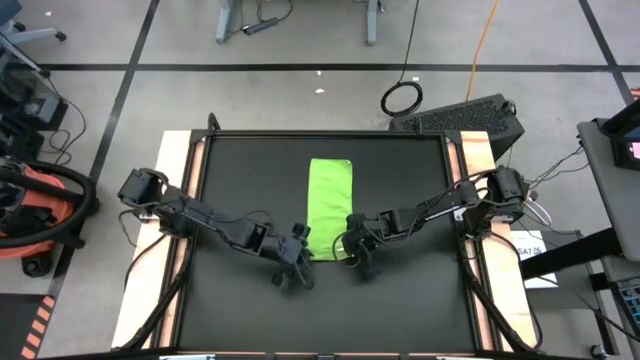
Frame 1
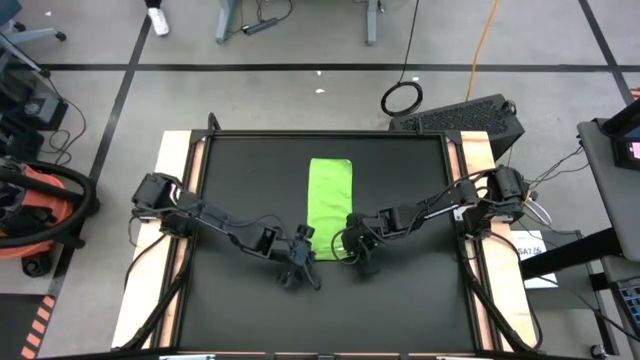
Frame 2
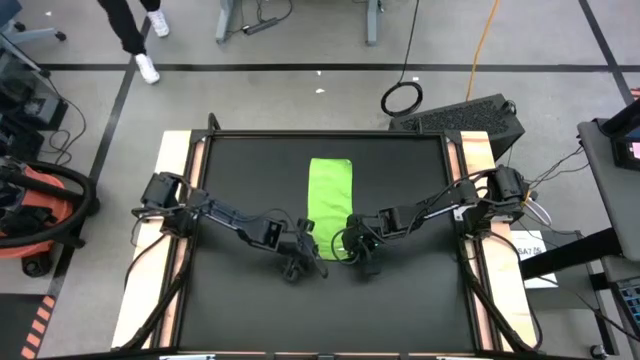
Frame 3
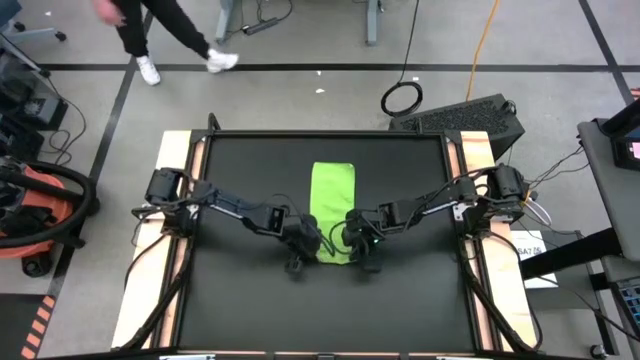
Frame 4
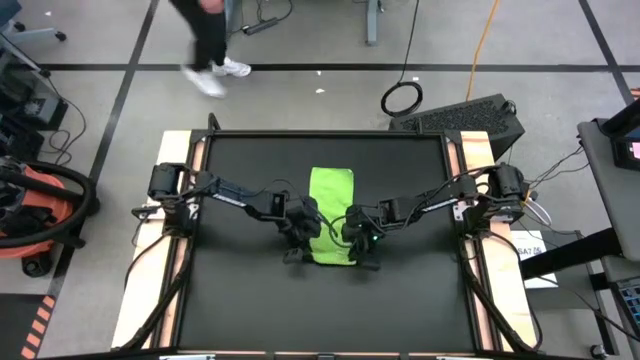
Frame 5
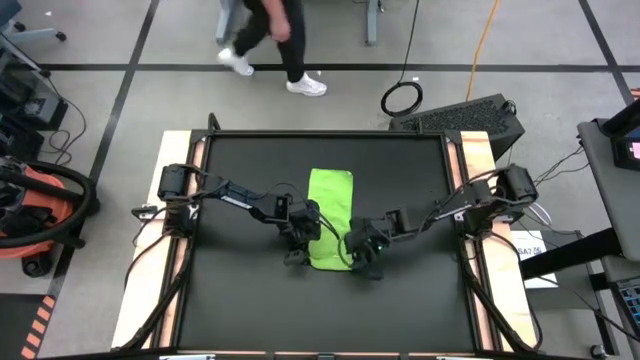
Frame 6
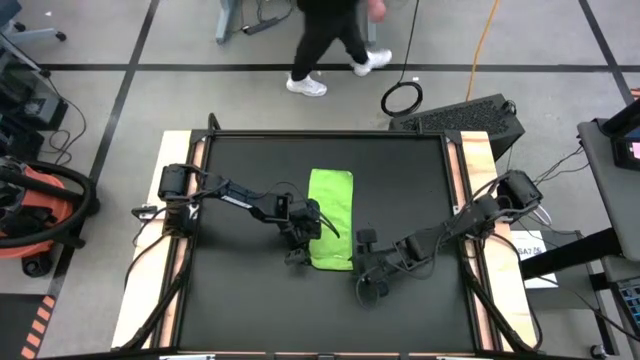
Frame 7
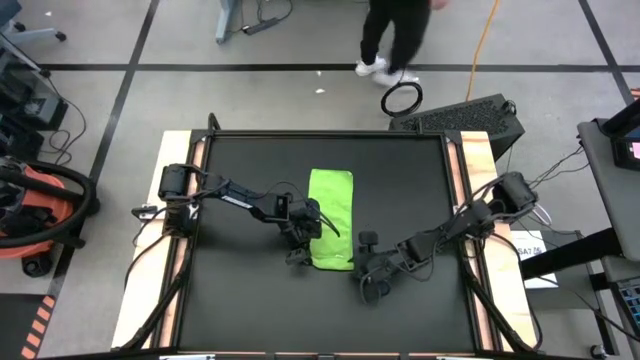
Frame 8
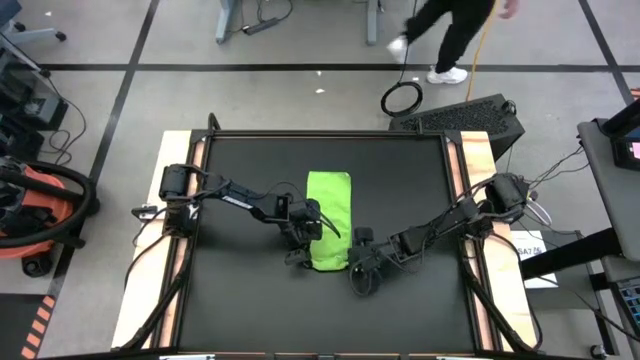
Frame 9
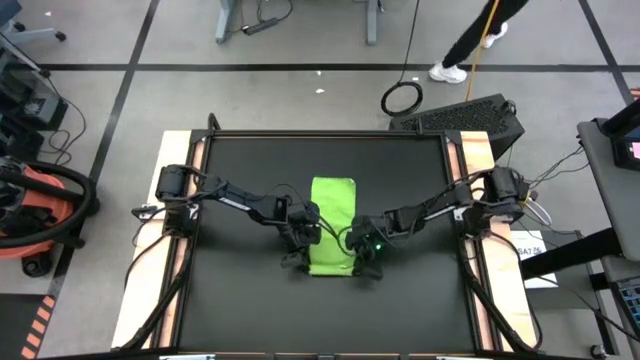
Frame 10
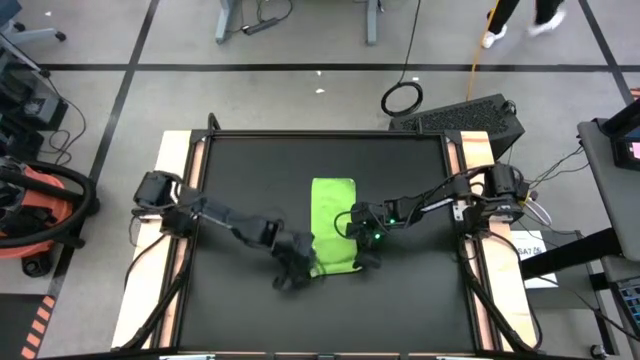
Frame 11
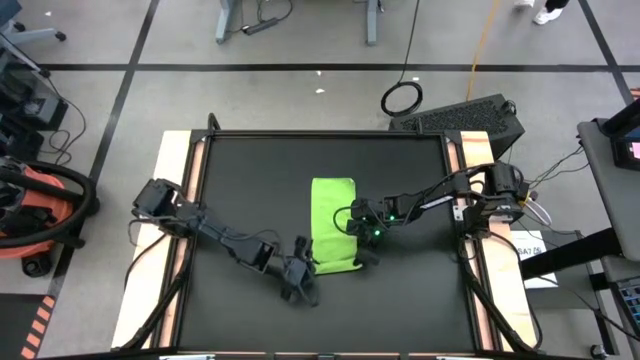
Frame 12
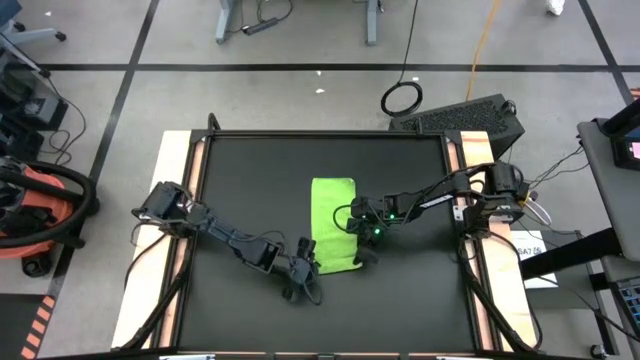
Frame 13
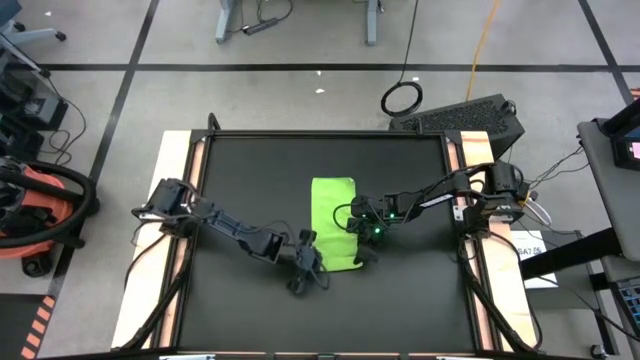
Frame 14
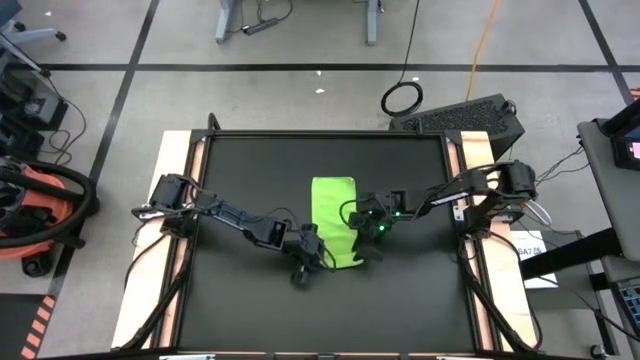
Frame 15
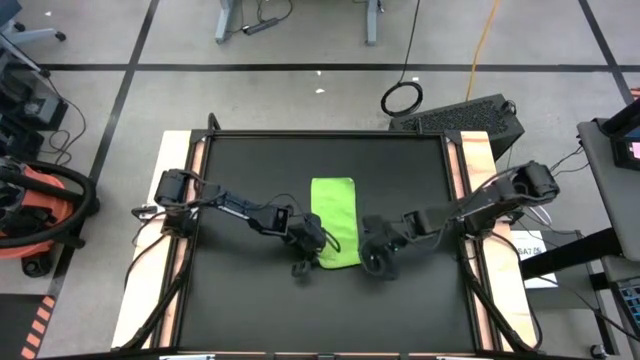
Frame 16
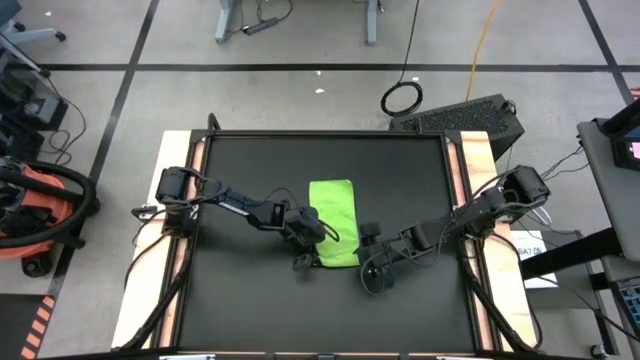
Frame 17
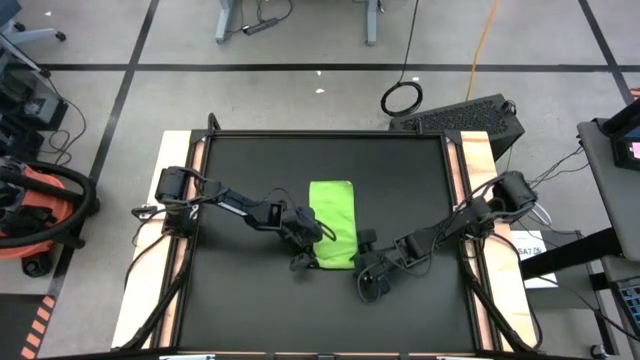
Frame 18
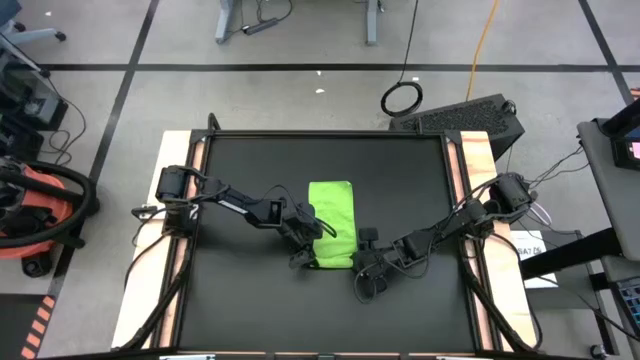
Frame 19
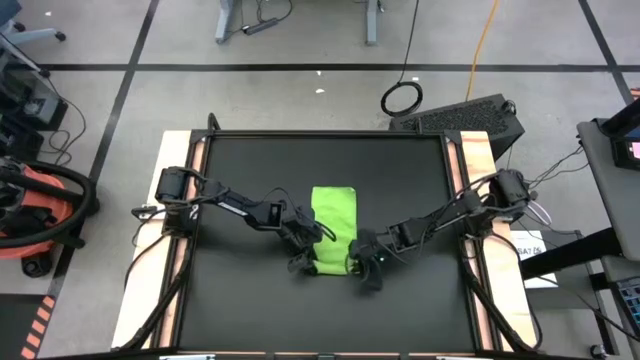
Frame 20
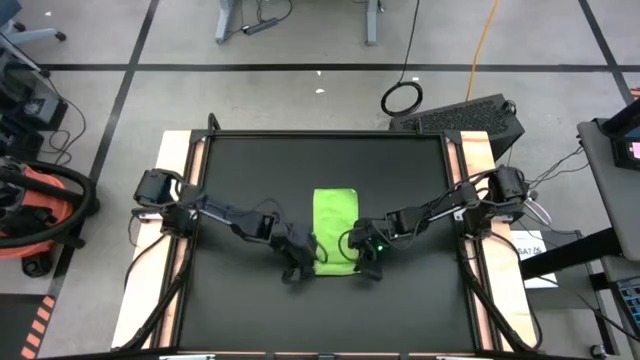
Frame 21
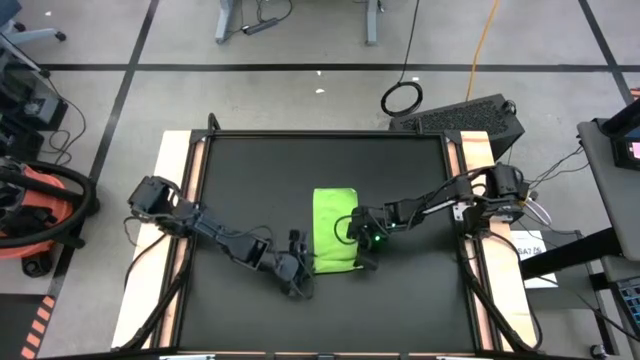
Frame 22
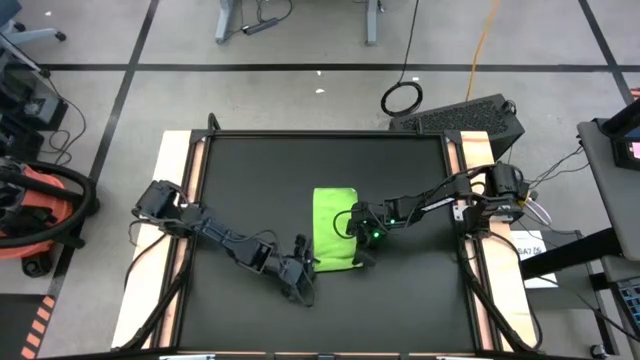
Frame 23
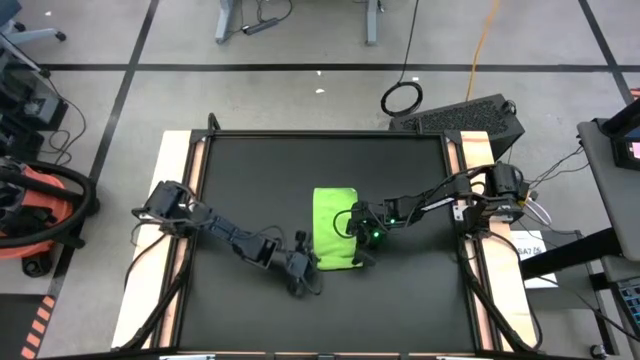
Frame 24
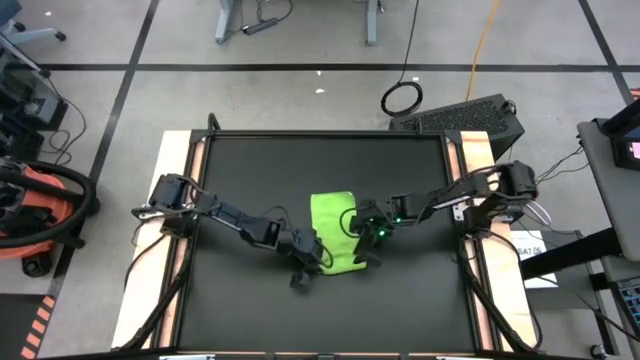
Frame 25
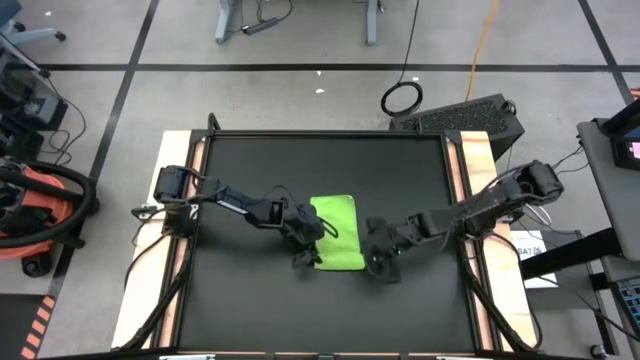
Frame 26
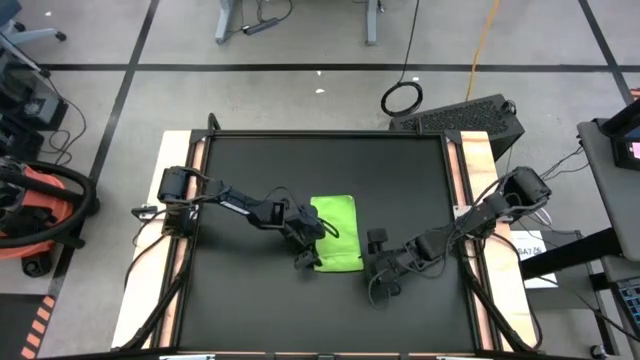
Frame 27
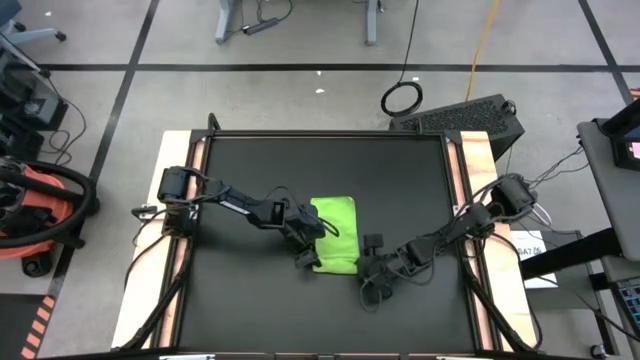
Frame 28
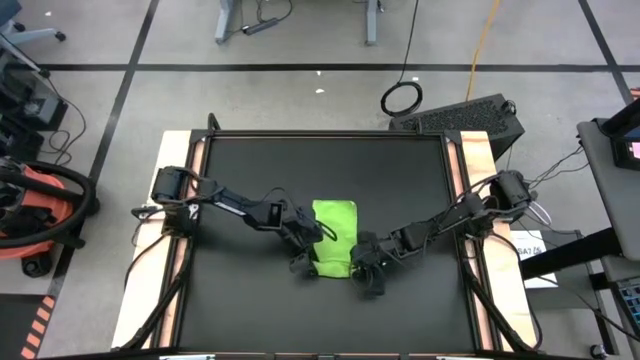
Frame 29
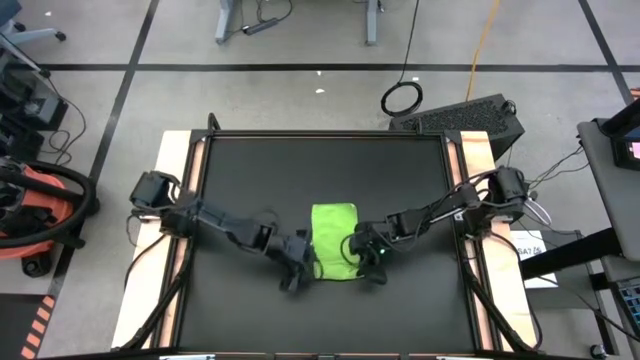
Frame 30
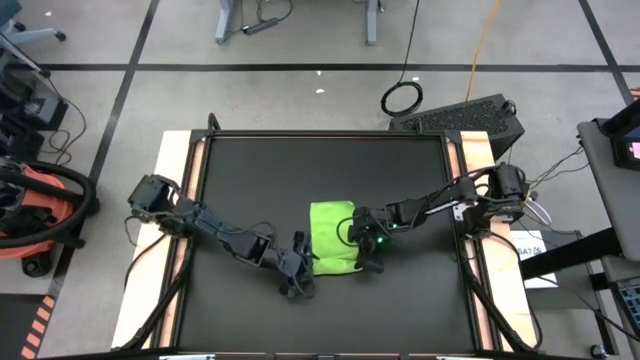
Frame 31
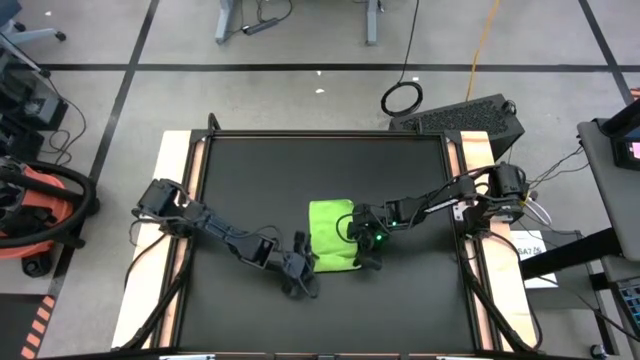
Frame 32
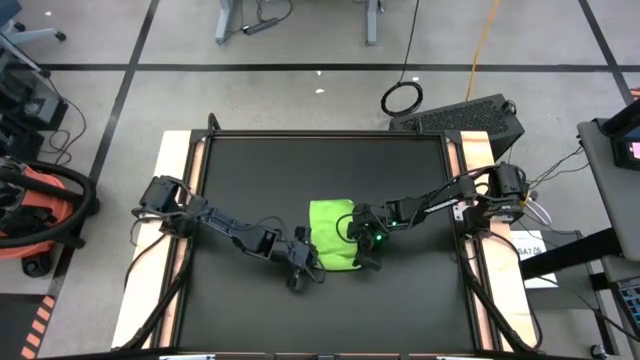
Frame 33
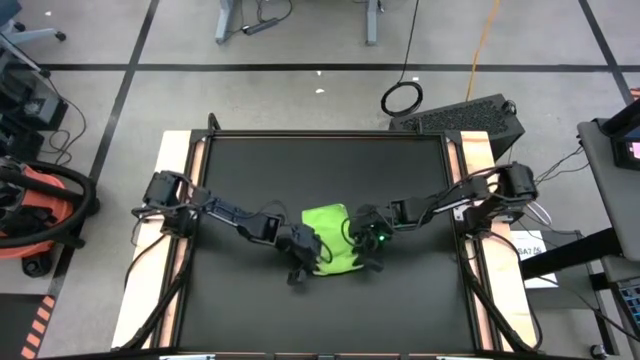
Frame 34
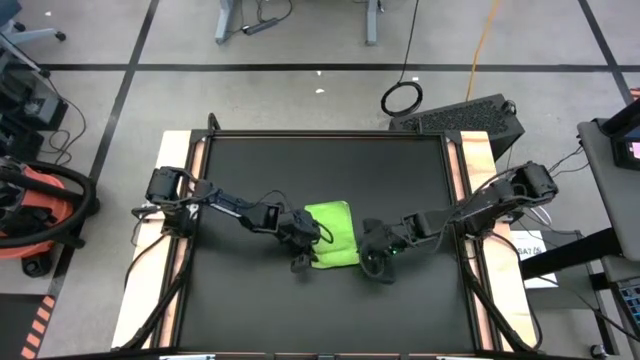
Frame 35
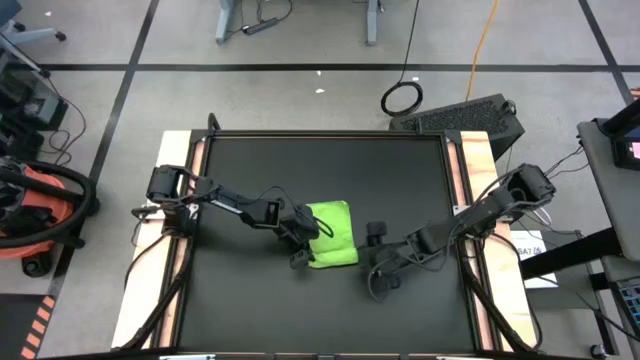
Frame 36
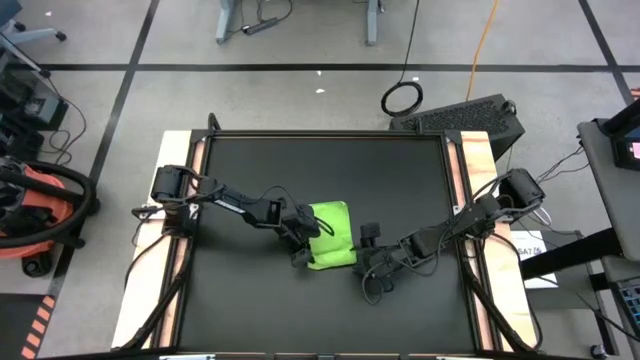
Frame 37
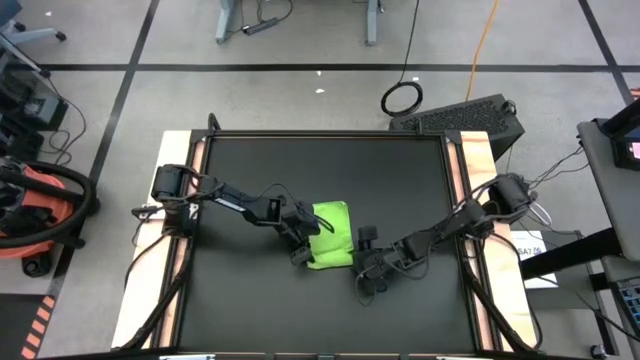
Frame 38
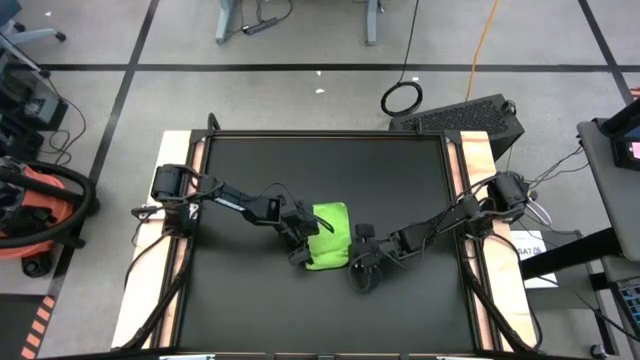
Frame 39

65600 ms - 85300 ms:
Task: Roll towel
Roll the green towel

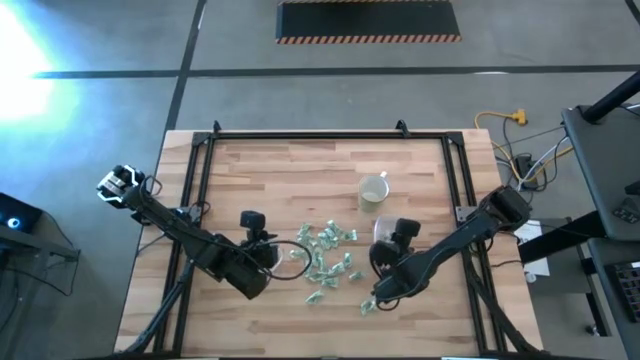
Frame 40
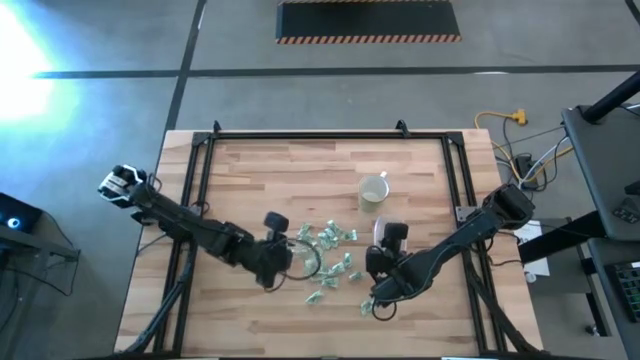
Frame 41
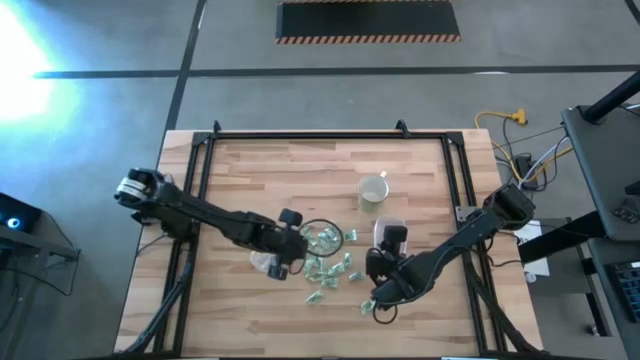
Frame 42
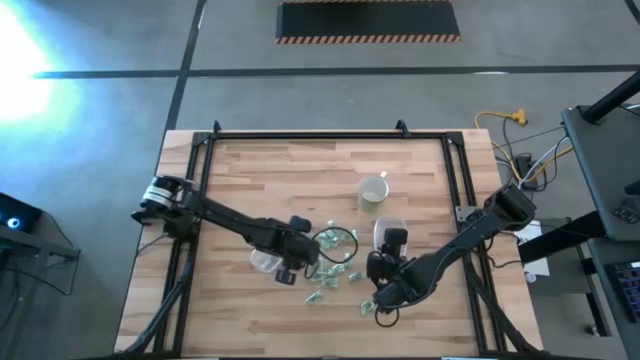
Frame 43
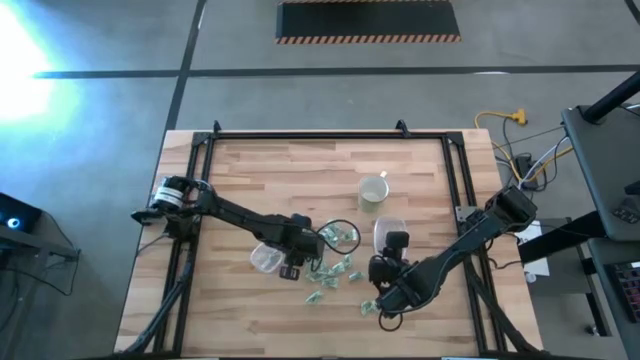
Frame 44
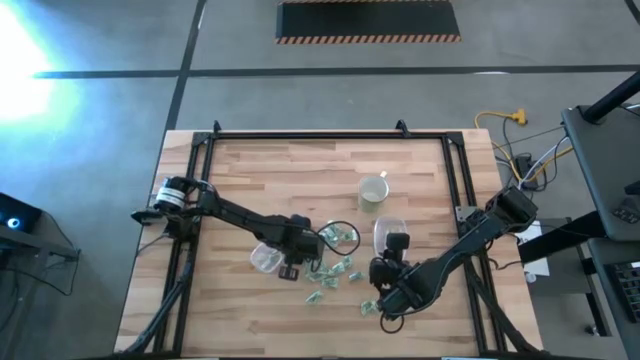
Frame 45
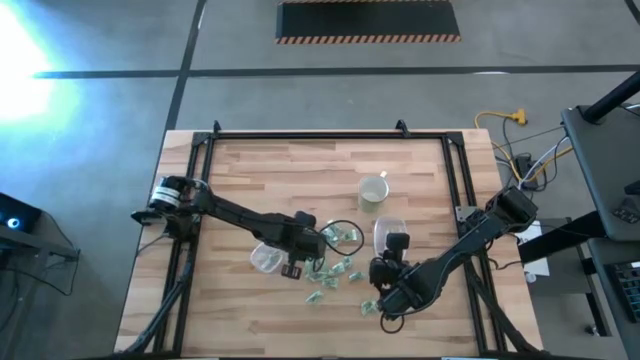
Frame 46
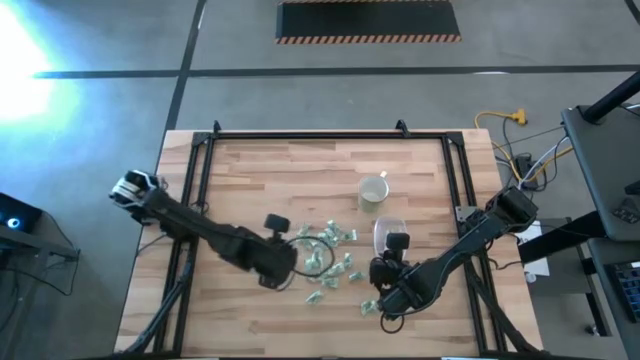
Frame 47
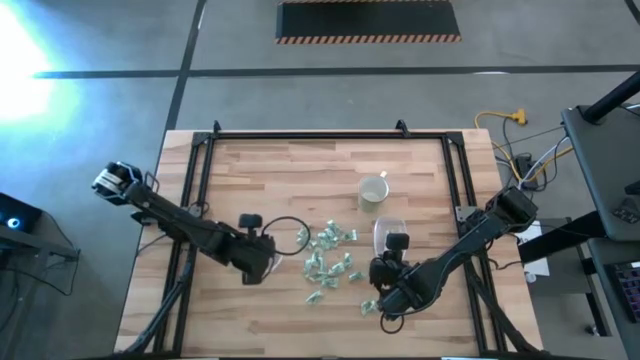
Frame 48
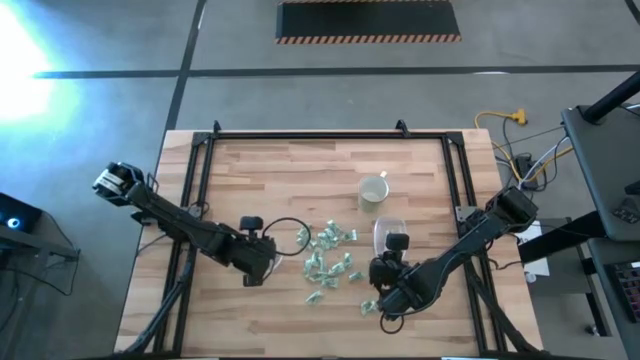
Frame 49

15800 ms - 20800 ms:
Task: Pick and place Stevia / Truvia into bins
Put the stevia packet into the left transparent container
